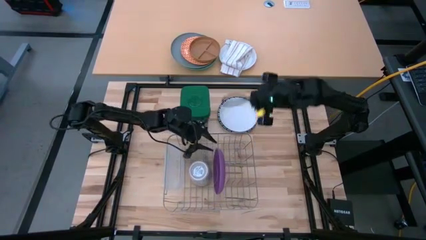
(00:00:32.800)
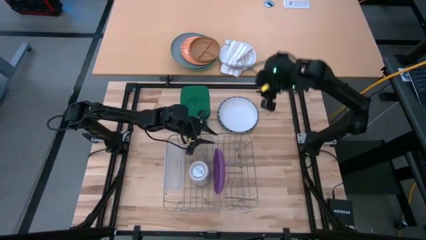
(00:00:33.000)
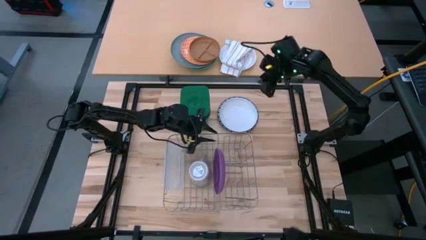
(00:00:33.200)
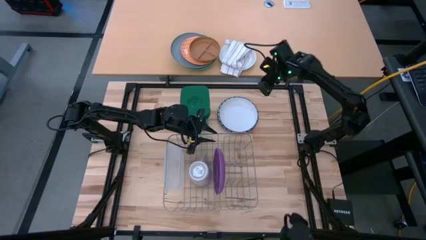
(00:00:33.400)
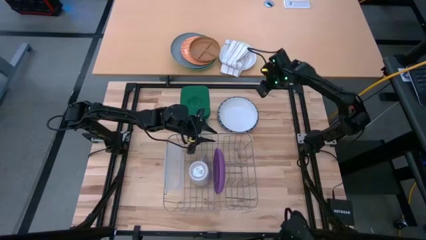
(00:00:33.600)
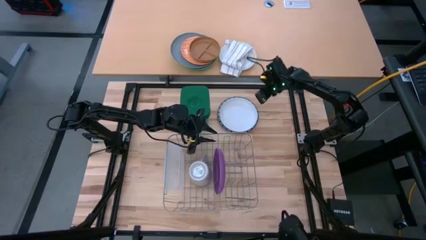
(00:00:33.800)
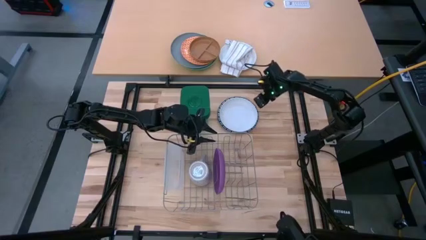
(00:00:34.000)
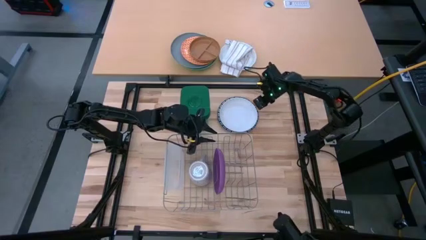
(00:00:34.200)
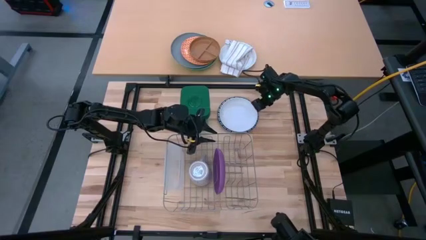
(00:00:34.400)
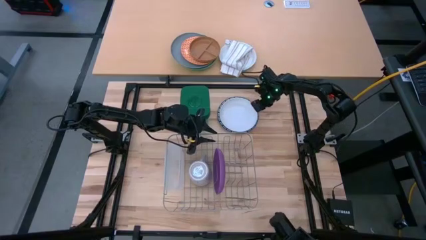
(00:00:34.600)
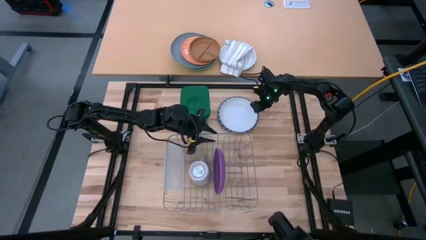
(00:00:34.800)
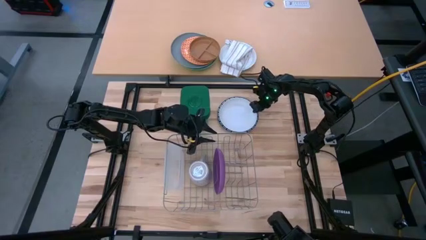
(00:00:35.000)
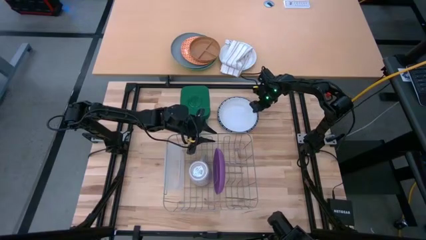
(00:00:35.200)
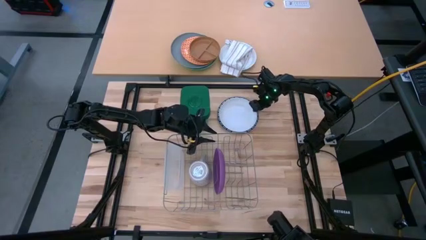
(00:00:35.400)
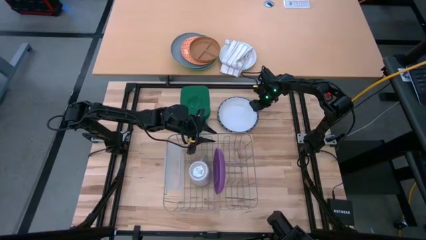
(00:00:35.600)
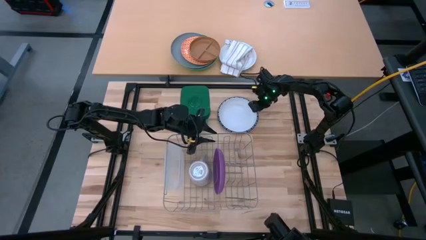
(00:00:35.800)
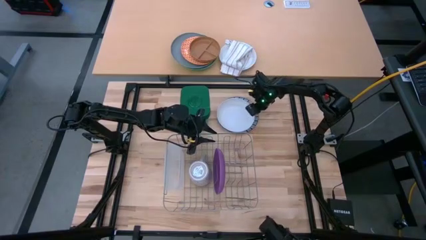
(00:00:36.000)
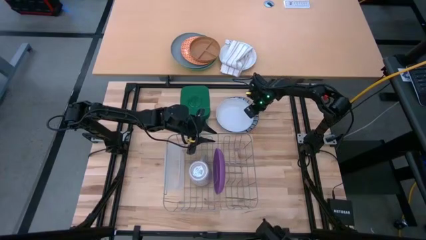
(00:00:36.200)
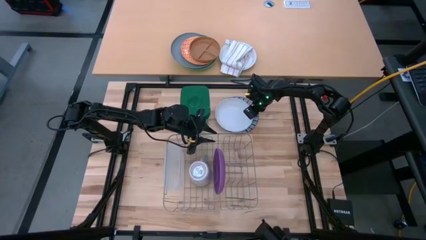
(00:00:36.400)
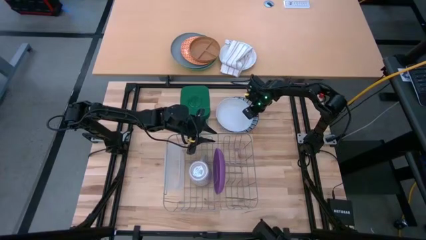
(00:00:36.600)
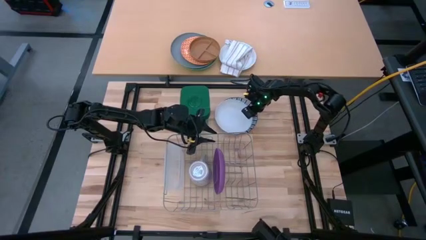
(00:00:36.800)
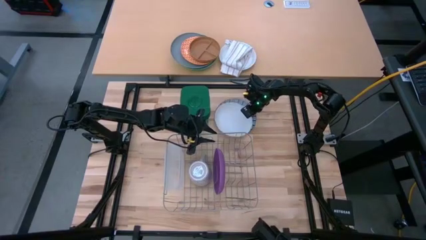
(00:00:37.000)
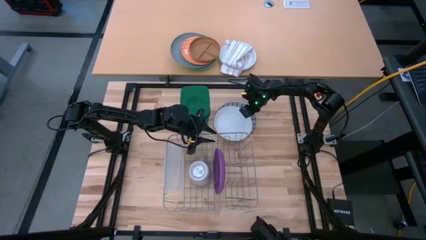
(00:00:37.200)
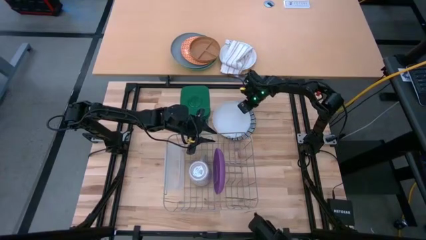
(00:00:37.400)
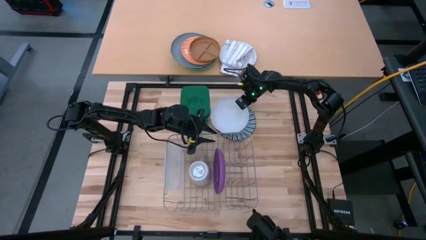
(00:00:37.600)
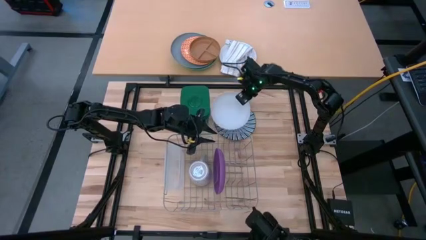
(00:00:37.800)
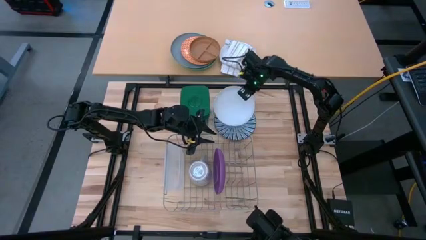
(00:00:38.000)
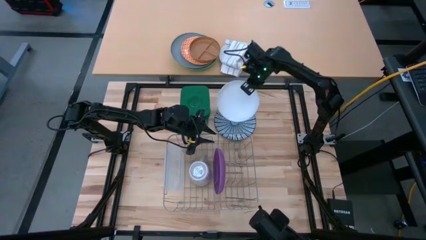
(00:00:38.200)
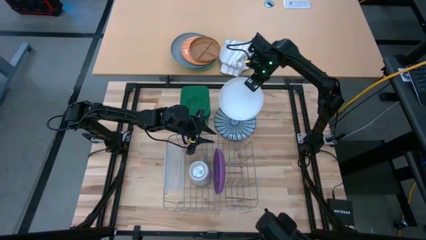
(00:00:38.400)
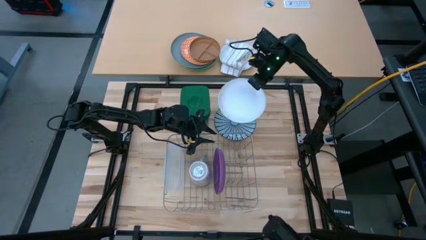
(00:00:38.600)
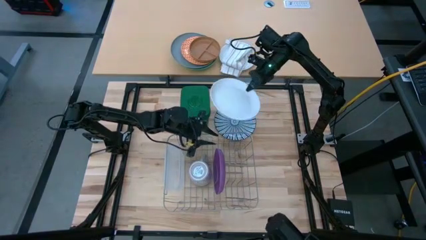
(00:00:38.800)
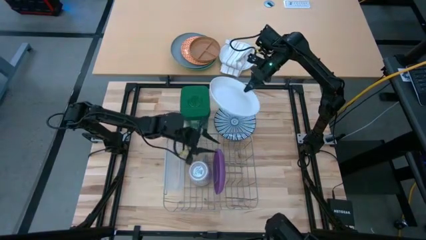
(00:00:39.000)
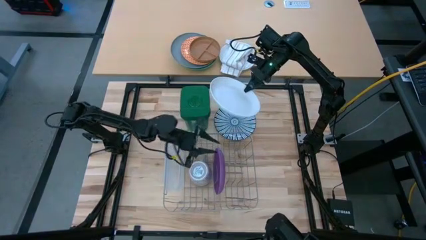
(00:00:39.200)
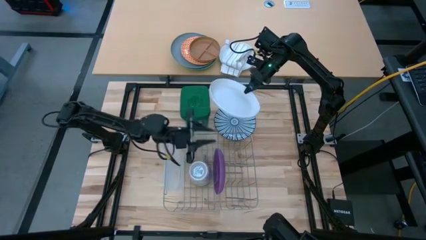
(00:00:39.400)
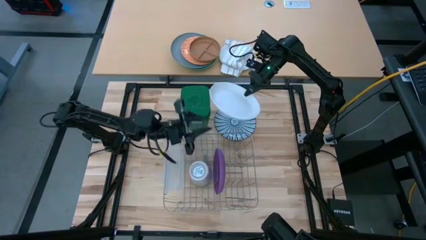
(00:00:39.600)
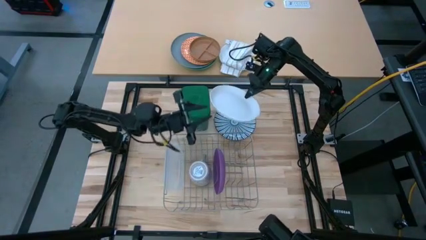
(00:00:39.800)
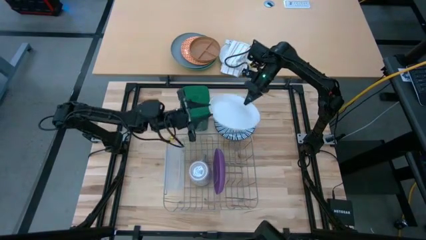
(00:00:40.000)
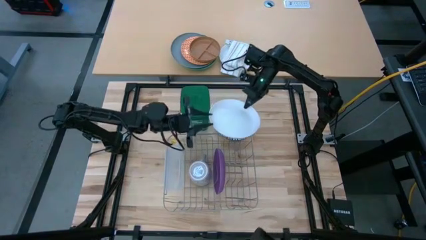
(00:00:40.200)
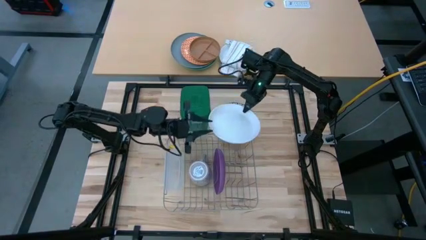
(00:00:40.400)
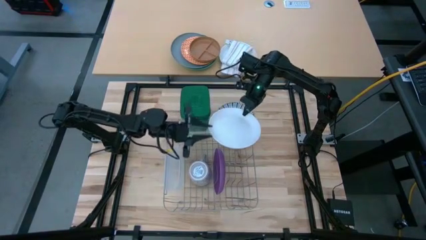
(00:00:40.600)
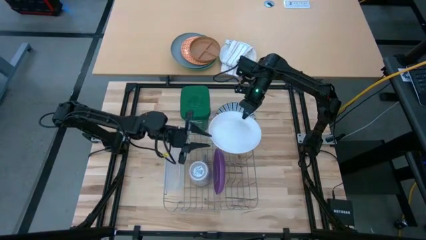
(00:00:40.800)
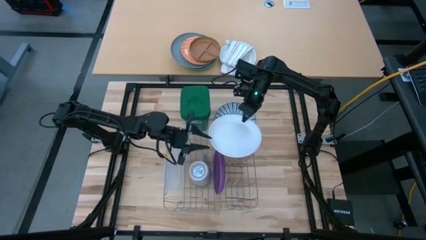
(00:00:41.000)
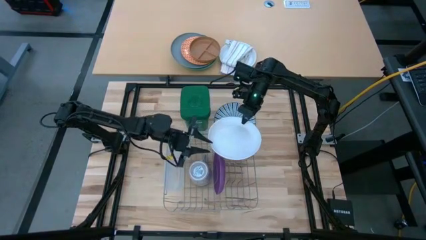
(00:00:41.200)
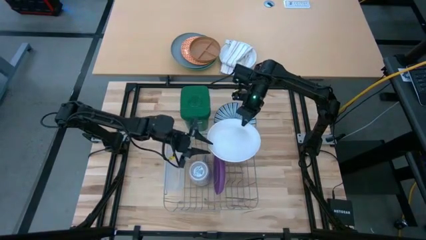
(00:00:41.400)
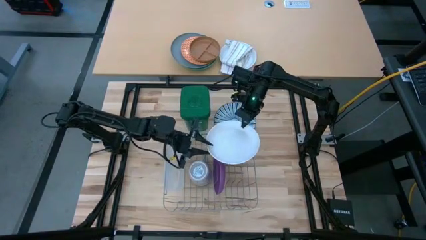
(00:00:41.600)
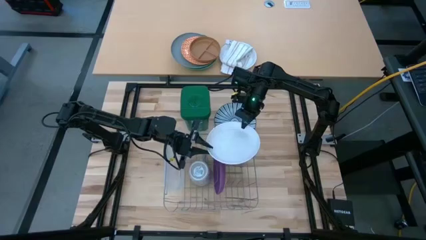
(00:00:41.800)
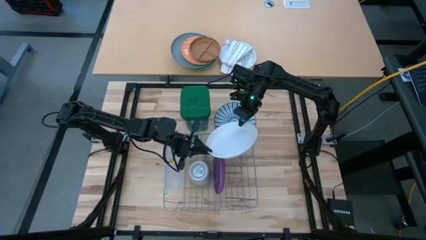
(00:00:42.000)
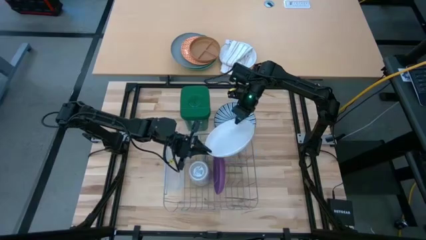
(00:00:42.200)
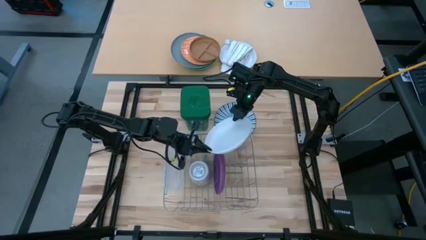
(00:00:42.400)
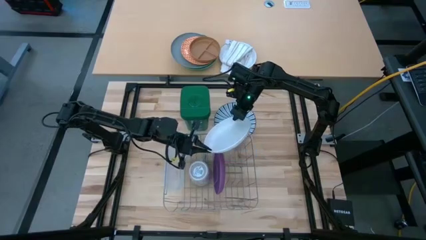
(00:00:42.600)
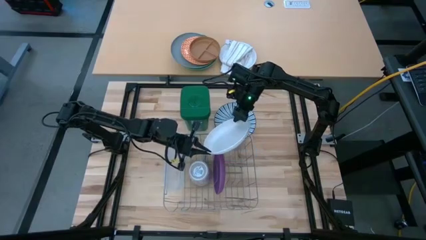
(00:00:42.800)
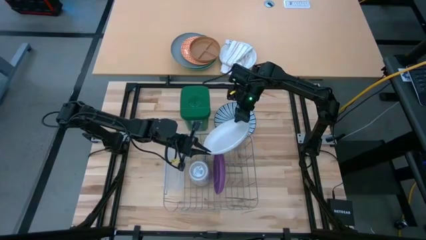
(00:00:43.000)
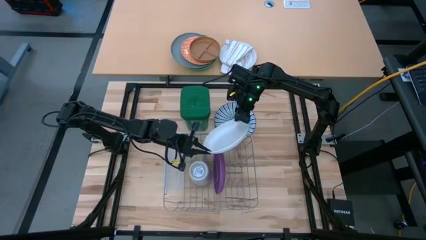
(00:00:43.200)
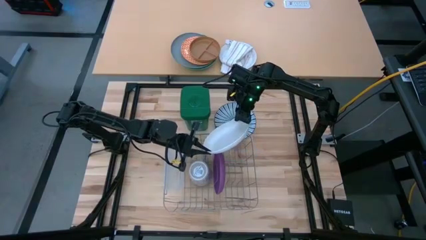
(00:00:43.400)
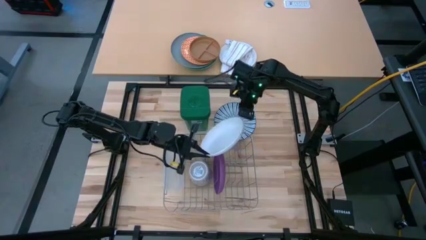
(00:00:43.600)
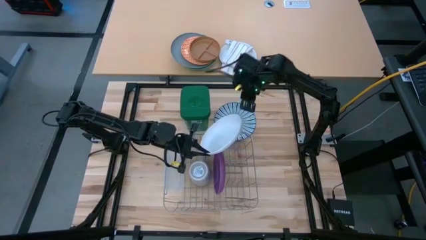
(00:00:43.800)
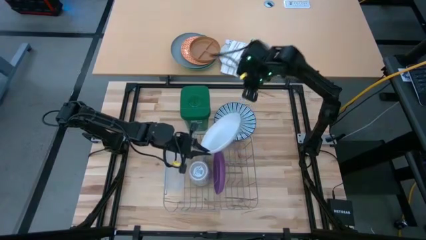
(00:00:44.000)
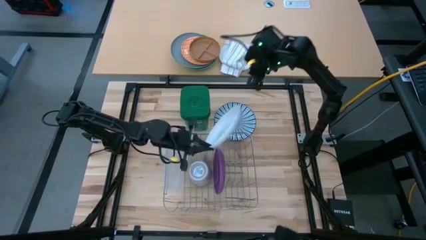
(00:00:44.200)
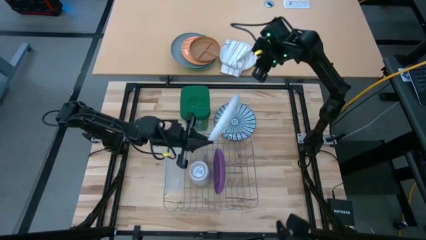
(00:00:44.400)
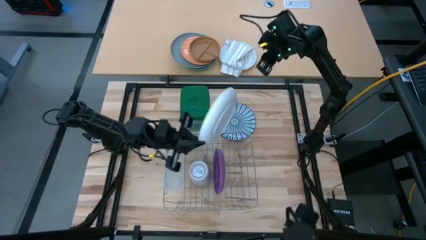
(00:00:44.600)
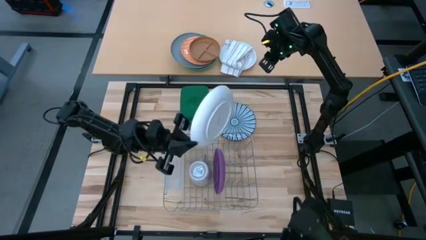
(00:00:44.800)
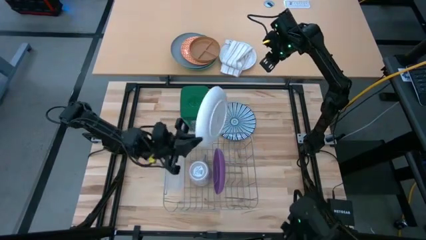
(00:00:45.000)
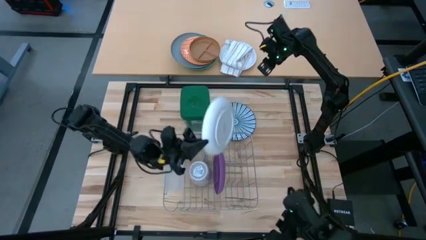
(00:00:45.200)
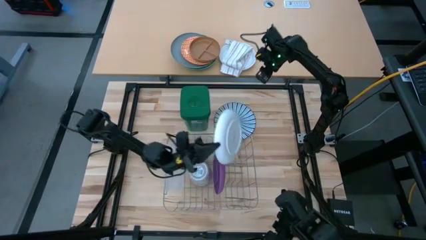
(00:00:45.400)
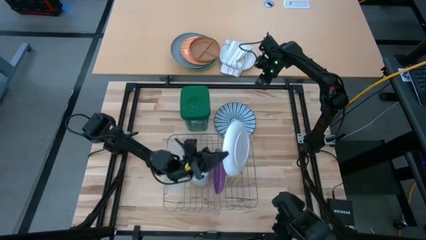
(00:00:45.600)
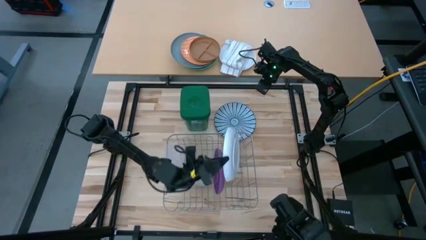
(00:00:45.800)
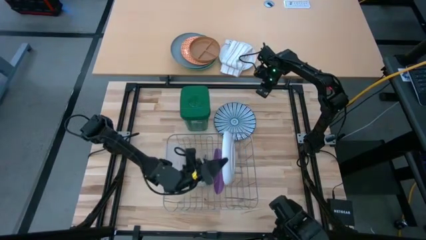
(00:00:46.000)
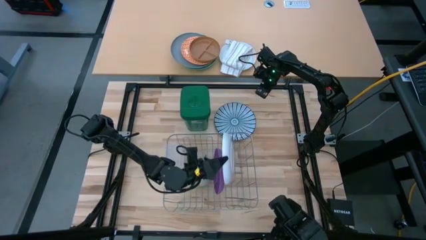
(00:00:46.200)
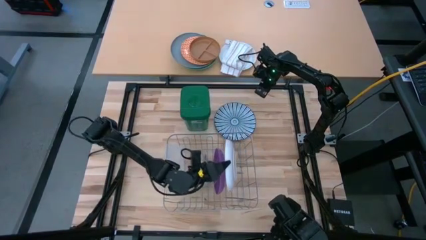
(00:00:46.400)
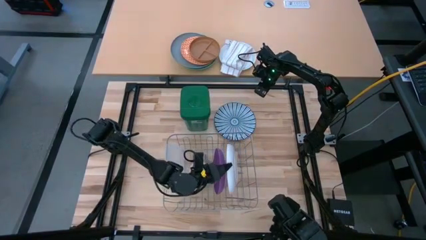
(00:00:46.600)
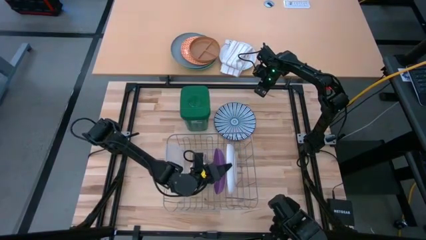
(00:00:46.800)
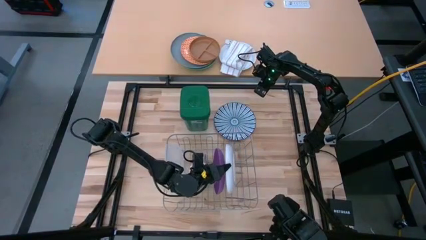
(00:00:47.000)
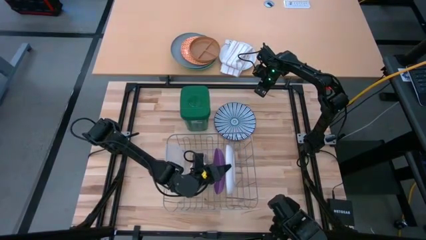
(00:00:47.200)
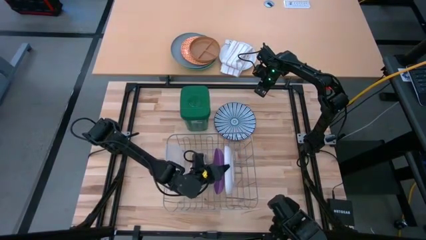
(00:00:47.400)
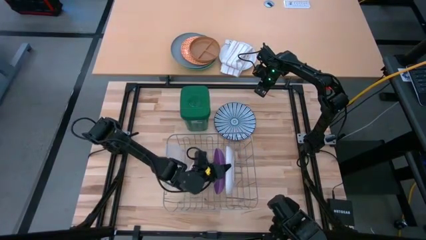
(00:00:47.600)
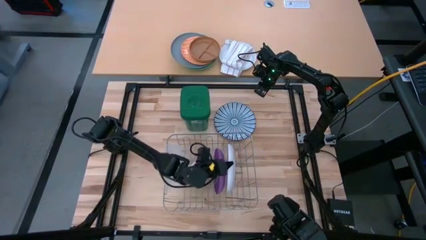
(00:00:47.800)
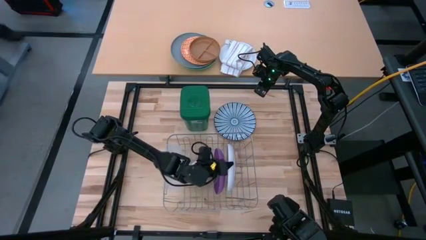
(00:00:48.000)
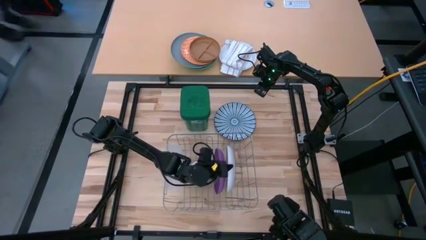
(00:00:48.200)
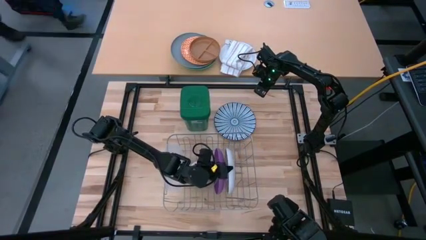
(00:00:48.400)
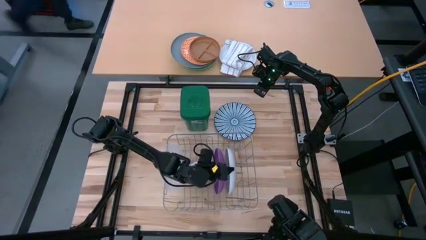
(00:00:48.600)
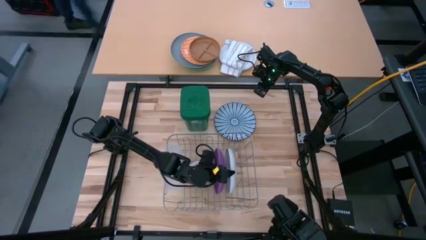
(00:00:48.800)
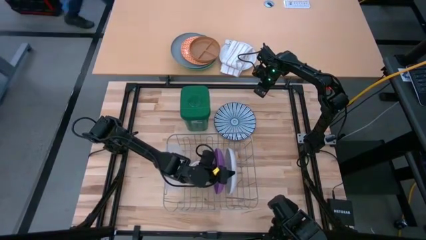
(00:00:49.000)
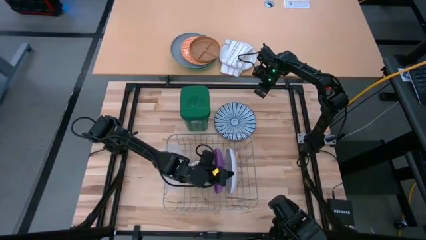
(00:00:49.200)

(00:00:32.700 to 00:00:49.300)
Task: Sort dishes
Put the white plate into the dish rack

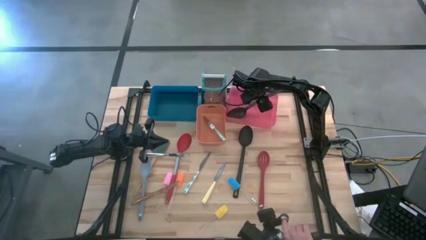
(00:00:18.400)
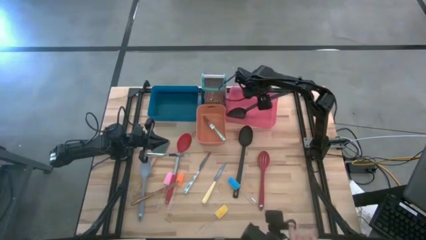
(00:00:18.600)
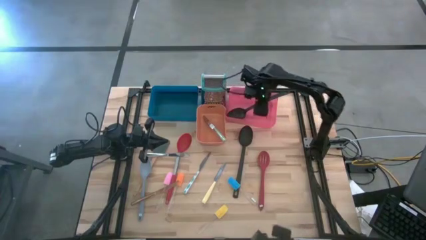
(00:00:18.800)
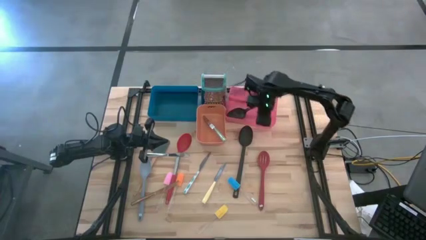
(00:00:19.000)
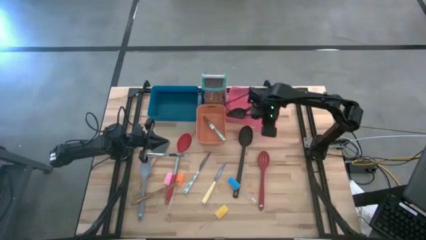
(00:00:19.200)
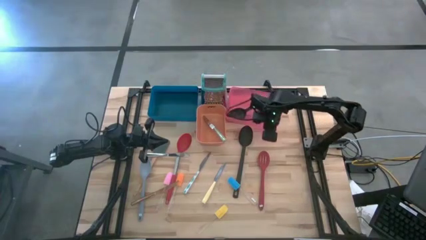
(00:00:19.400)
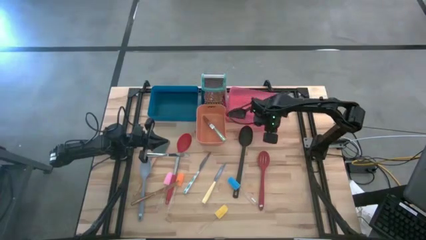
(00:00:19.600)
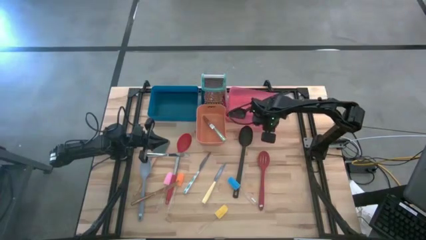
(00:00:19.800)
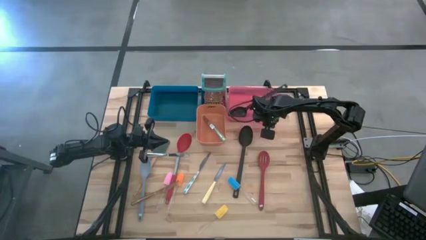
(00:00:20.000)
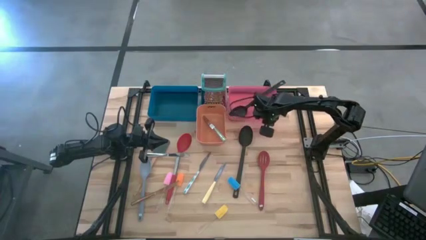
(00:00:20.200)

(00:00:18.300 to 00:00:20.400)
Task: Pick & Place Kitchen Items
Adjust the pink bin
